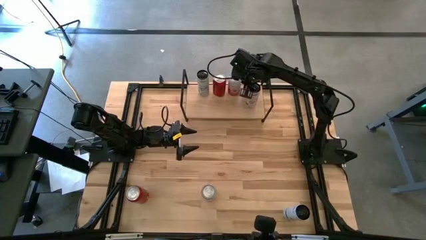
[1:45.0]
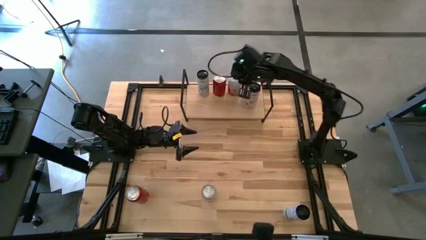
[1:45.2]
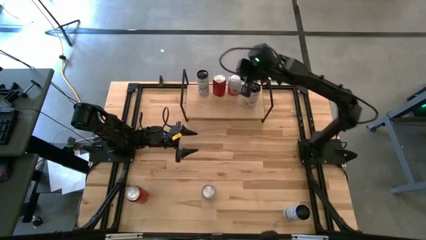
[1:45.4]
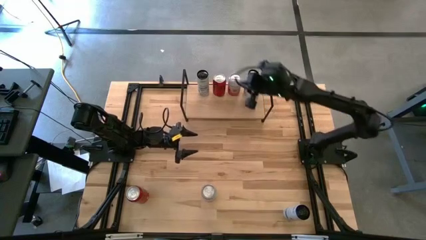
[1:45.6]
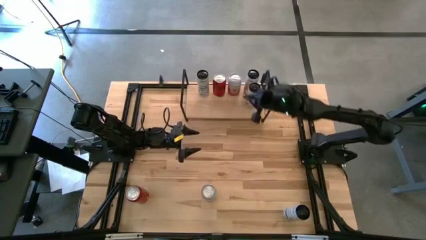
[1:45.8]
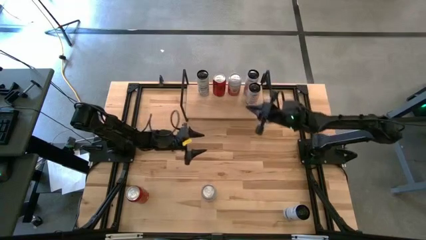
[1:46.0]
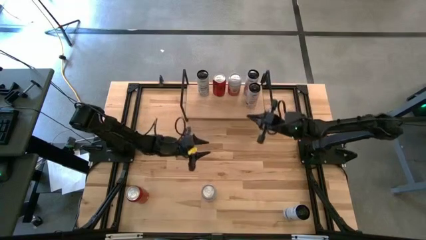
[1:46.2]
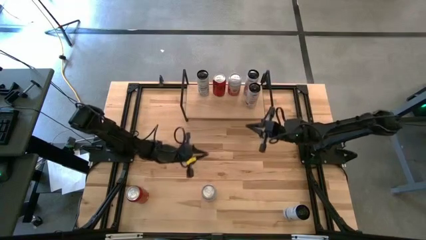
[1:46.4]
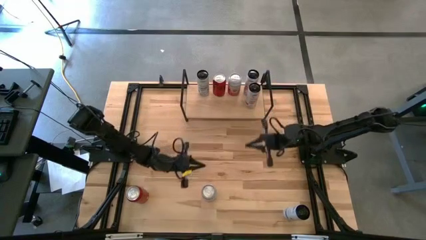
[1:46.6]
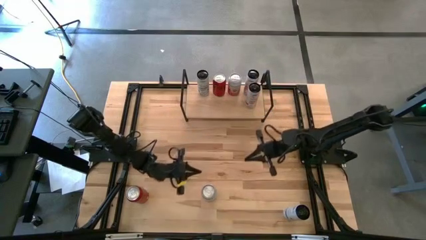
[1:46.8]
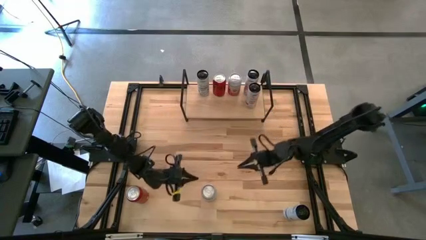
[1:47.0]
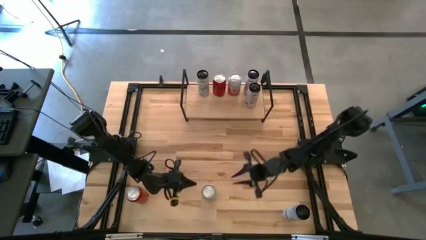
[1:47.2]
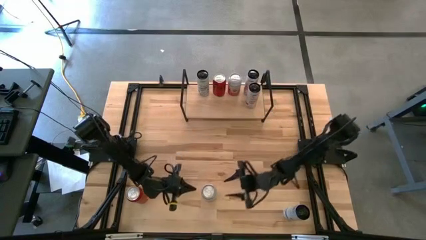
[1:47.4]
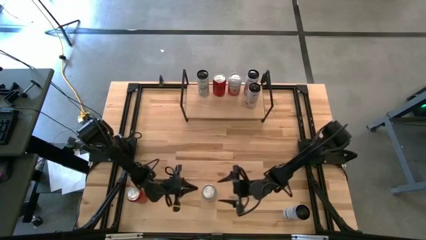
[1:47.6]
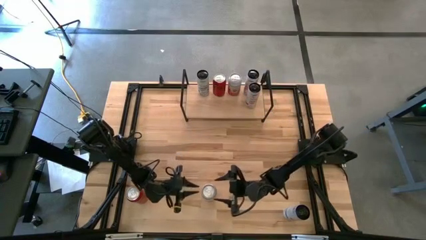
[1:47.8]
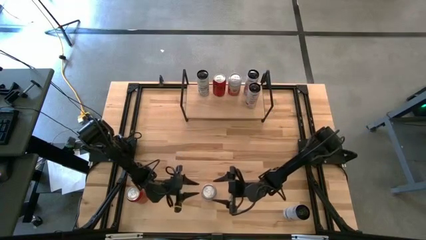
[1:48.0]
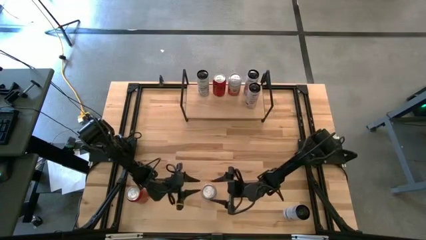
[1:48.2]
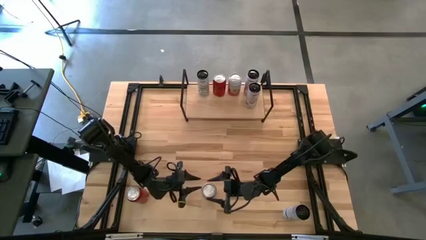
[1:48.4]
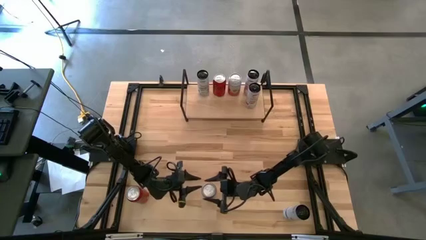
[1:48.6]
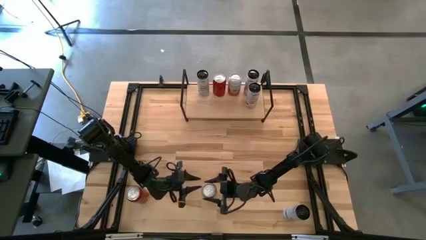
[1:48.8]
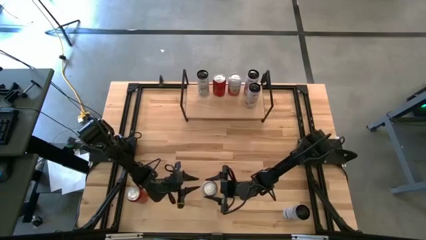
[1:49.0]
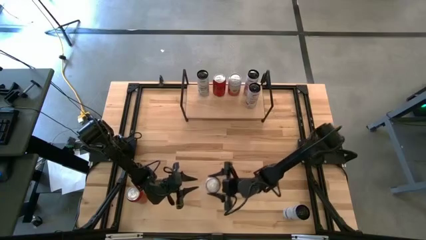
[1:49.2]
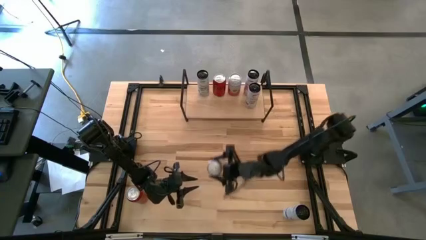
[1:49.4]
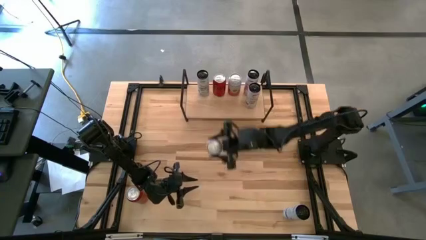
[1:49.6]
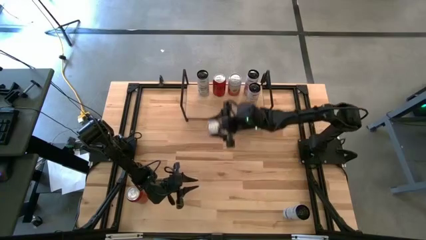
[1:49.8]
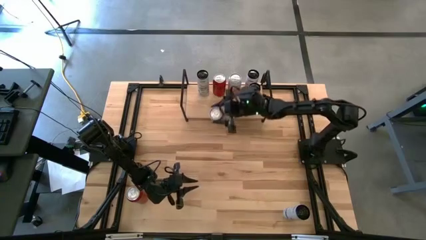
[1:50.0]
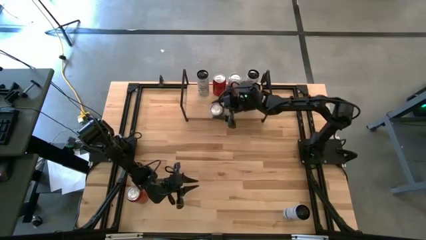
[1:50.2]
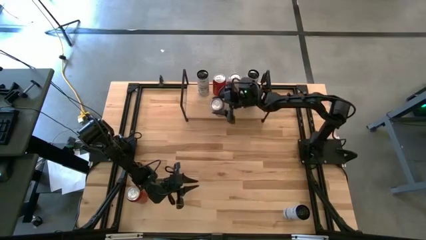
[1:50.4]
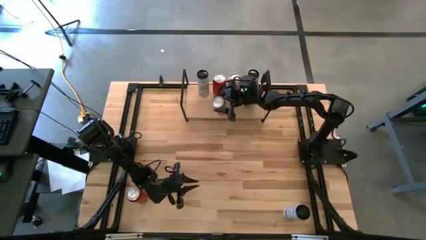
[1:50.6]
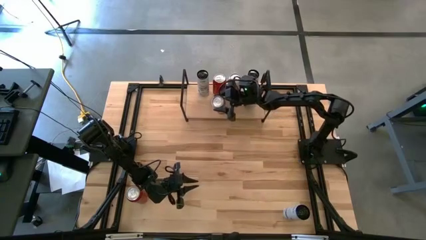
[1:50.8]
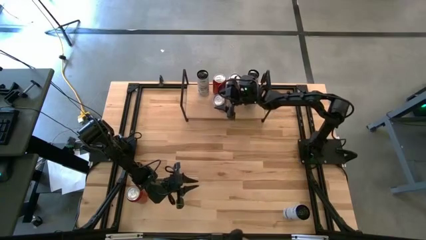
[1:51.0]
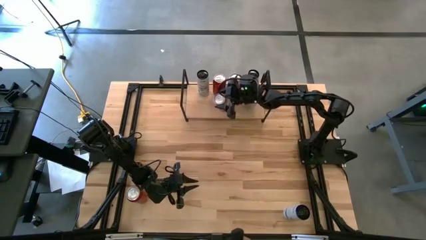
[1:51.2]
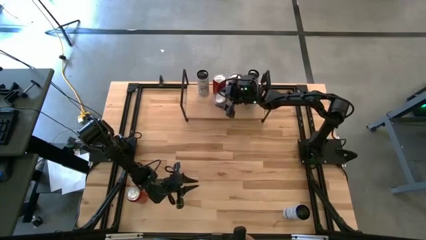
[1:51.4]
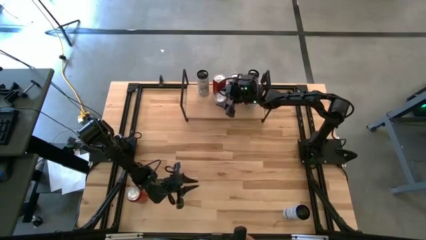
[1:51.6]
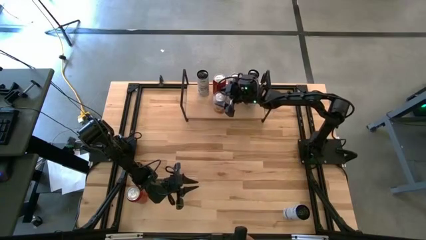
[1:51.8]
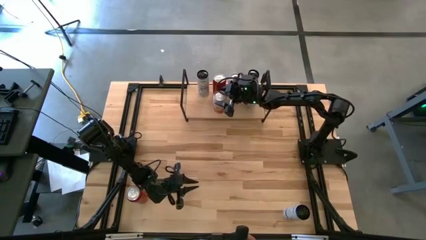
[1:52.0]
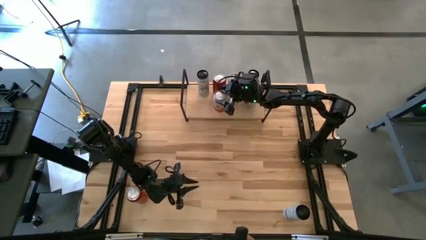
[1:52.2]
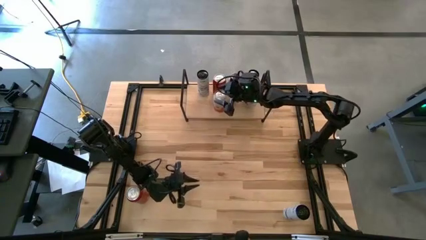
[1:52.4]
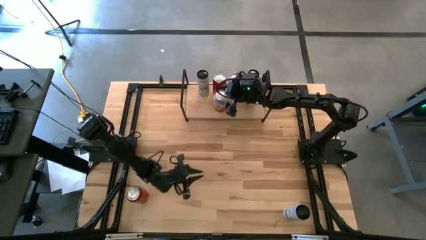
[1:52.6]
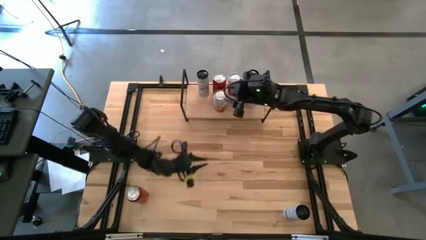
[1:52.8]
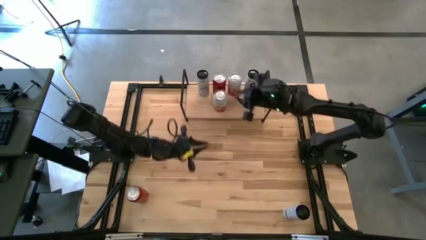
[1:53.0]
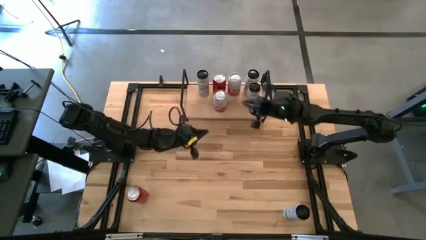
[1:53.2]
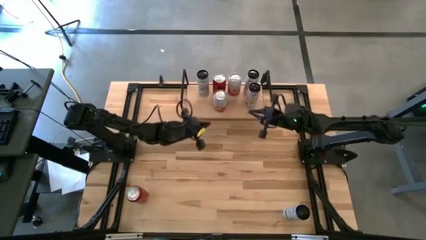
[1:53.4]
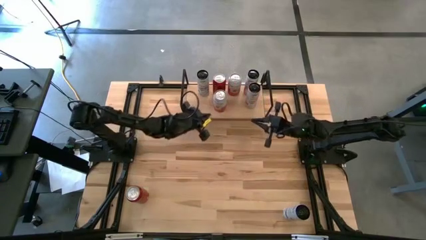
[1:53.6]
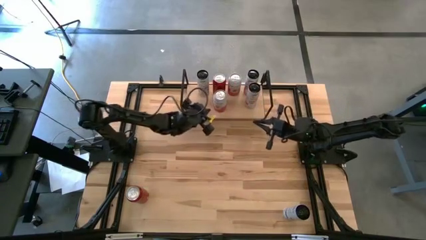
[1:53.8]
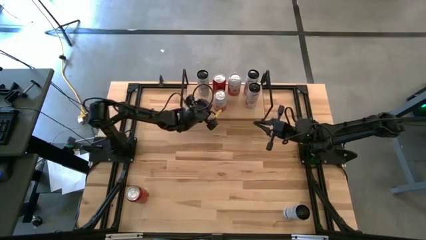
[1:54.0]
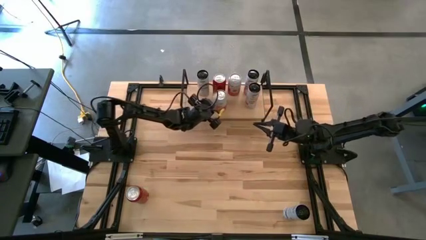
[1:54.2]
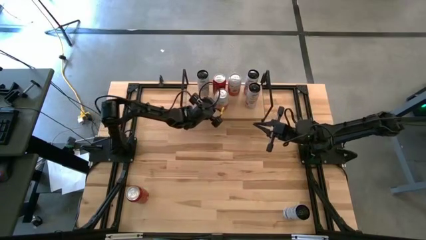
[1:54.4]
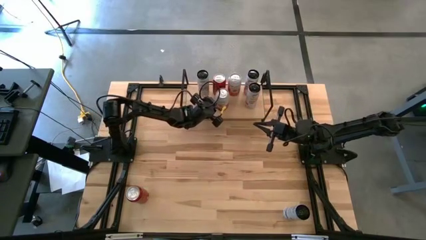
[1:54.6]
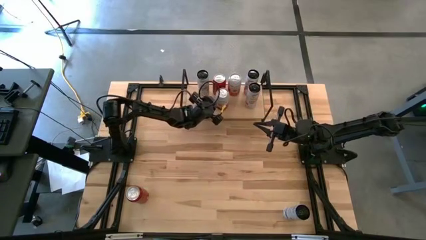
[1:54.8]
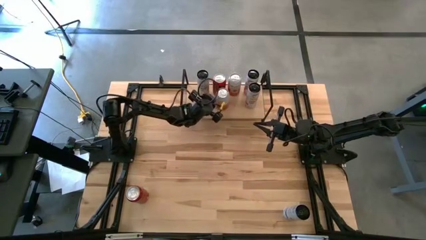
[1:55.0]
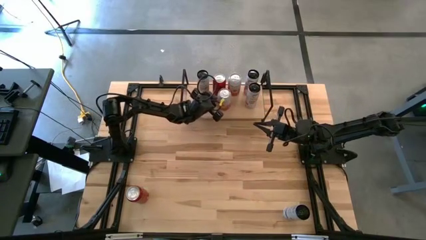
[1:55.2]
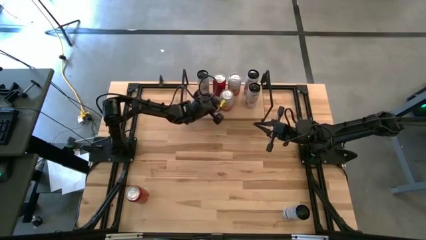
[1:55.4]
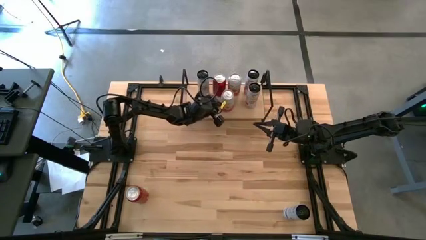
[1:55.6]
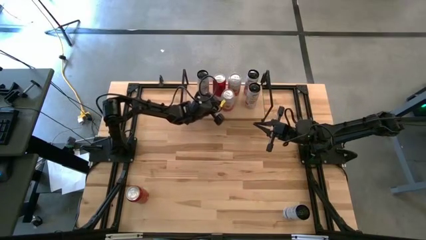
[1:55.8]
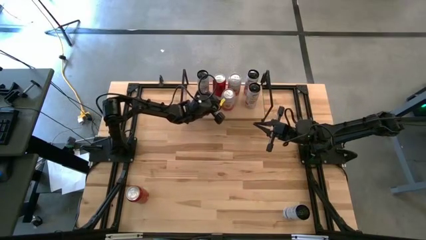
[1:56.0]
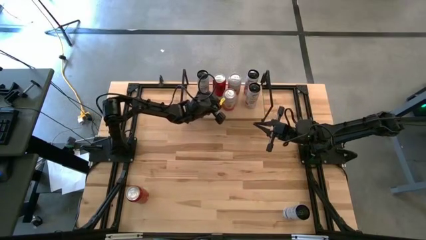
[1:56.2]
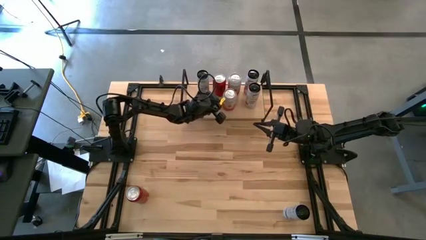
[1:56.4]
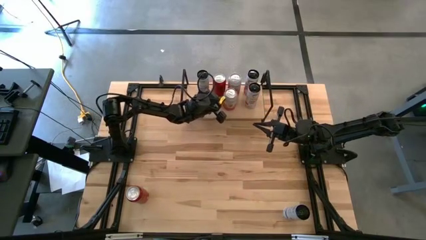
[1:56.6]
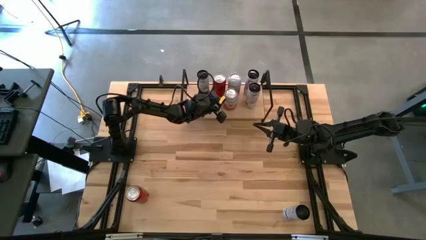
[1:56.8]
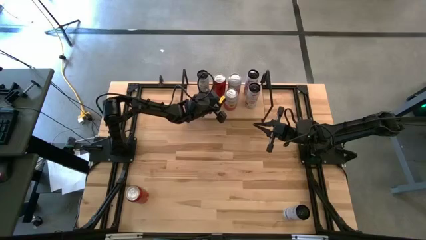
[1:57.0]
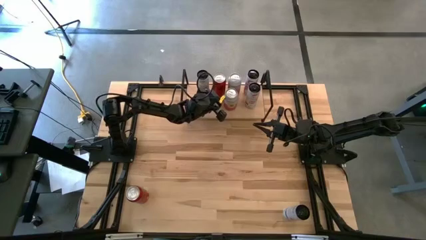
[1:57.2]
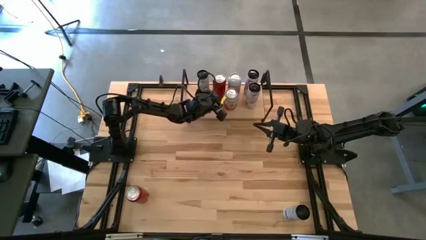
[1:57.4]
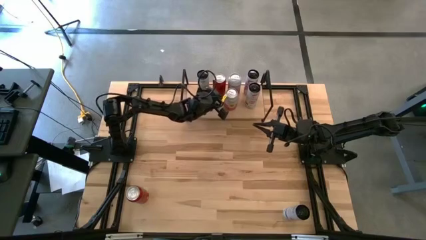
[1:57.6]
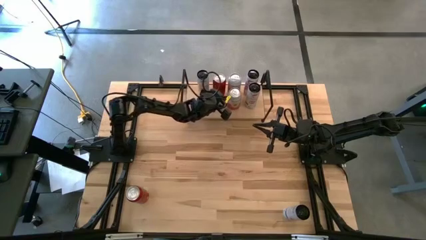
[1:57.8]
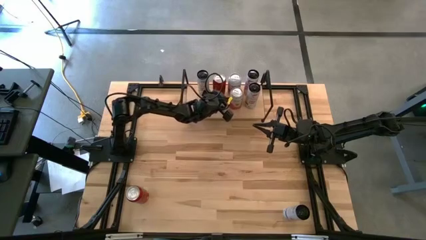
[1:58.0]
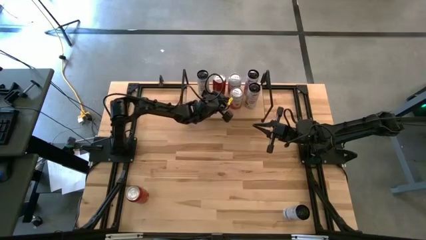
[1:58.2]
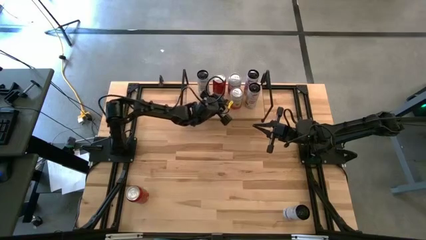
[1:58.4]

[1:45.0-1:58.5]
Task: Place canned beverage on shelf
Put the pink and white soda can on the shelf aligned with the other pink and white soda can

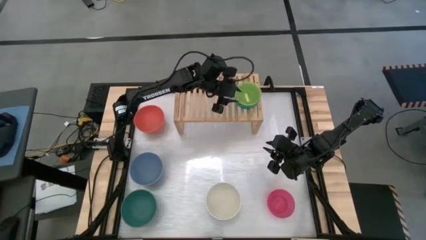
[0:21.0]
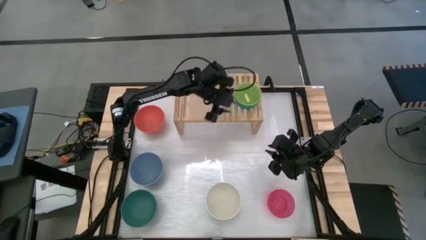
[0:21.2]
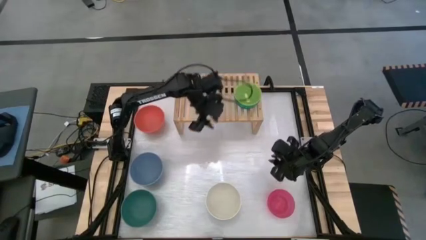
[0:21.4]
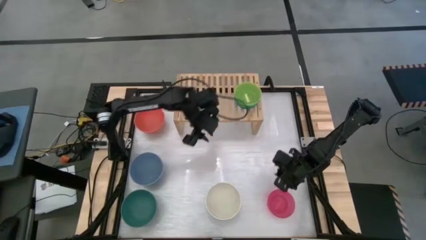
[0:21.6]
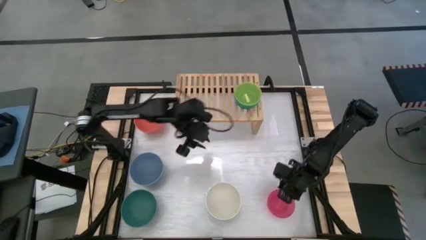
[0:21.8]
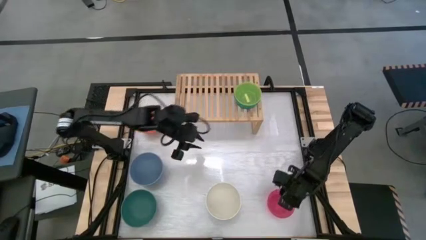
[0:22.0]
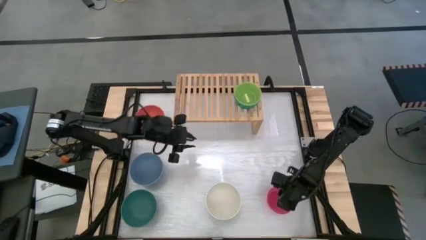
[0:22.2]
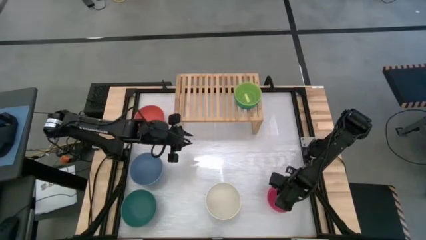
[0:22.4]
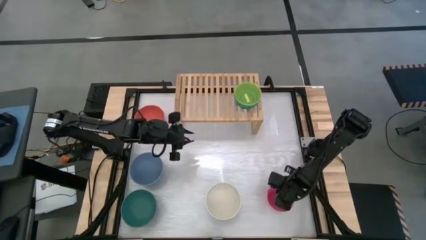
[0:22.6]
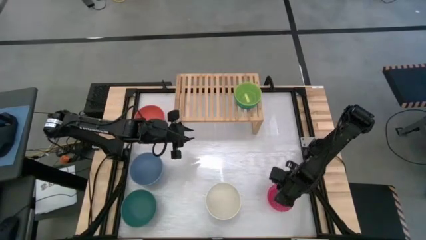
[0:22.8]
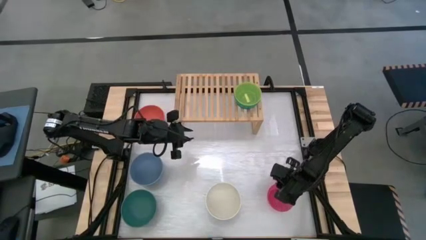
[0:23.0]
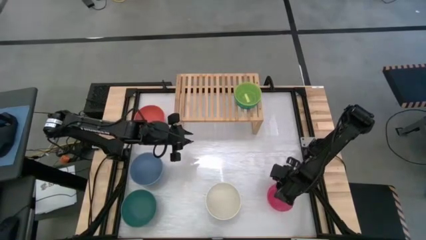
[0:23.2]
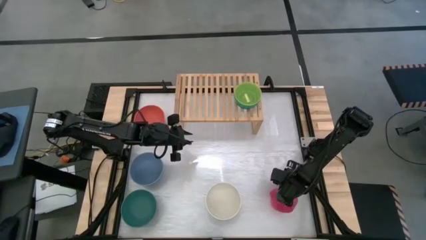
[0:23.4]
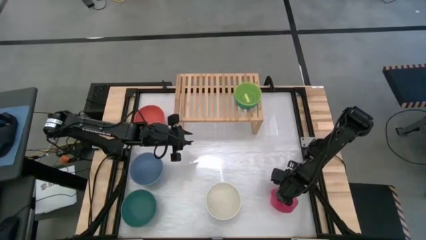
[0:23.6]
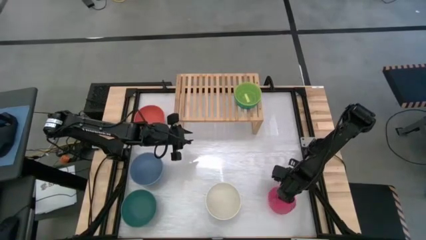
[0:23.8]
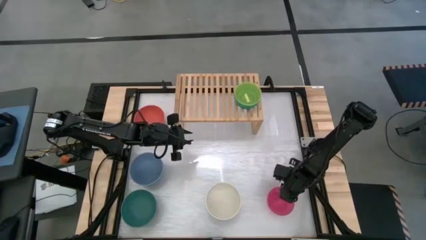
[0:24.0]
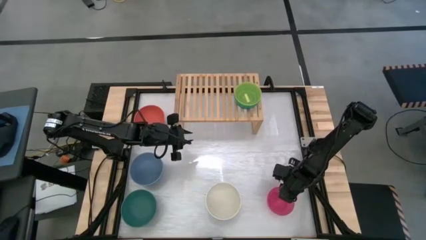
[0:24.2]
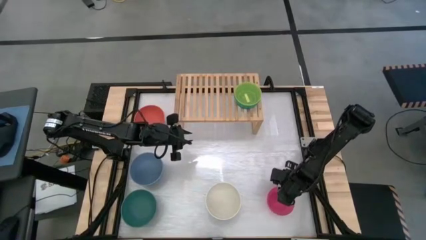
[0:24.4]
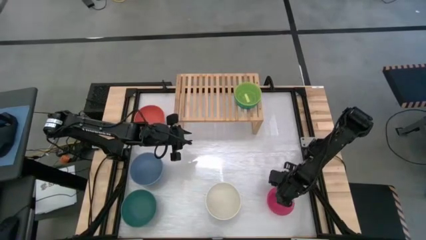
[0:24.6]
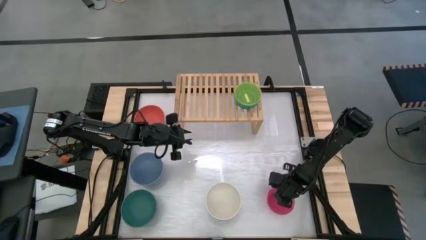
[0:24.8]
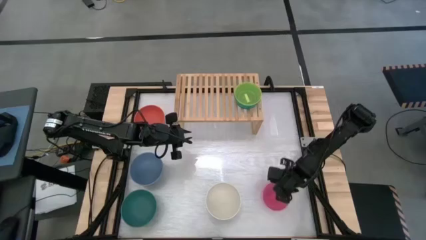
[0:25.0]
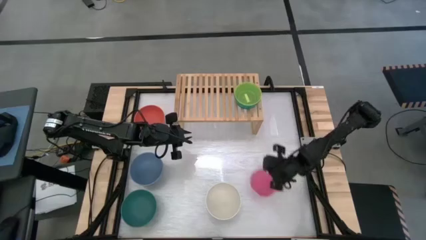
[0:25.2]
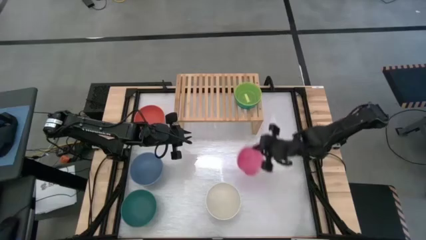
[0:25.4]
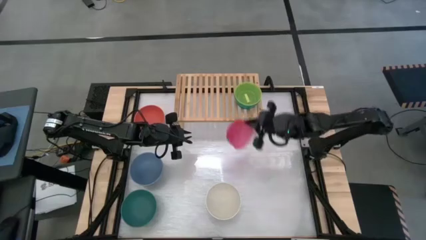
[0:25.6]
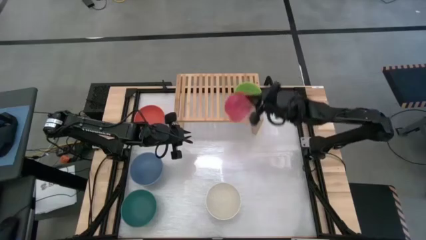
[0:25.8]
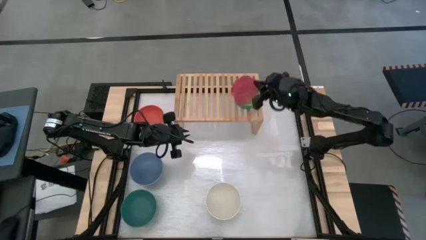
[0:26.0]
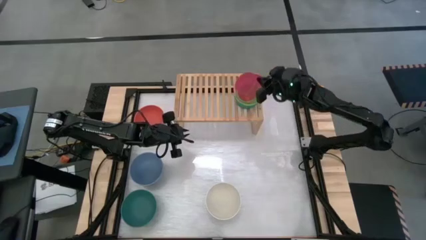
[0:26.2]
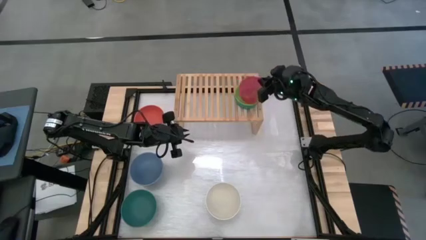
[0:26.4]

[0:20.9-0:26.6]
Task: Place and stack bowls onto a shelf
Stack the red transparent bowl on top of the yellow transparent bowl
